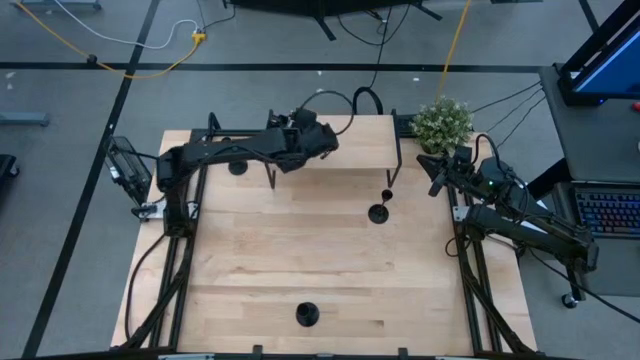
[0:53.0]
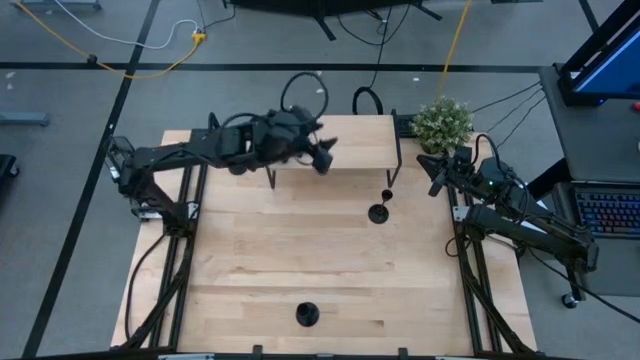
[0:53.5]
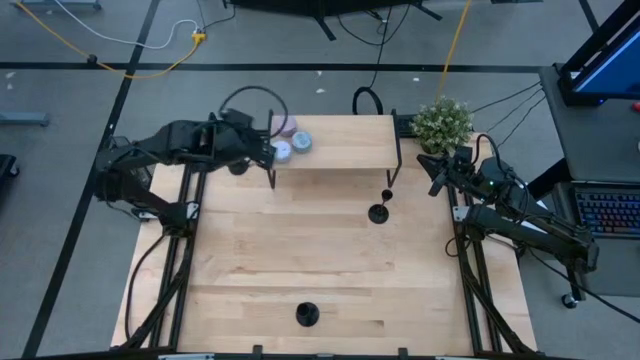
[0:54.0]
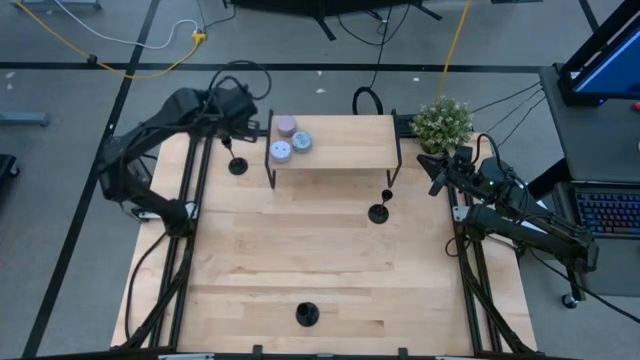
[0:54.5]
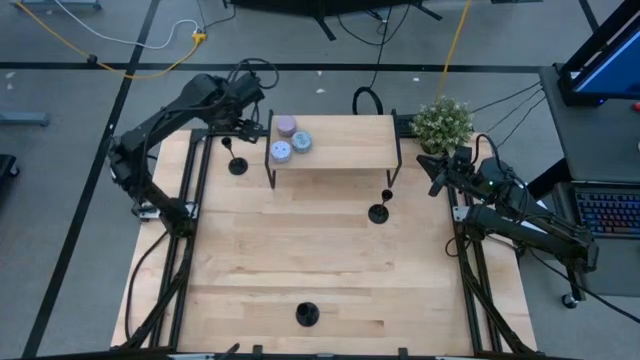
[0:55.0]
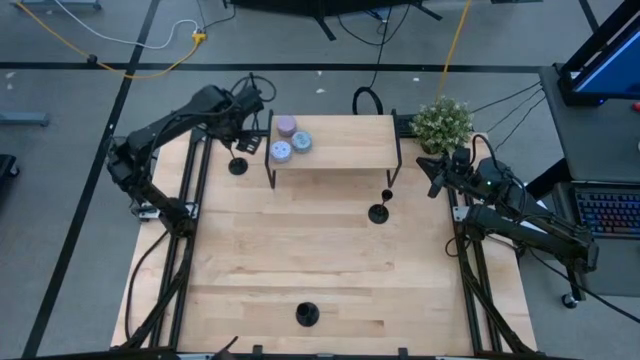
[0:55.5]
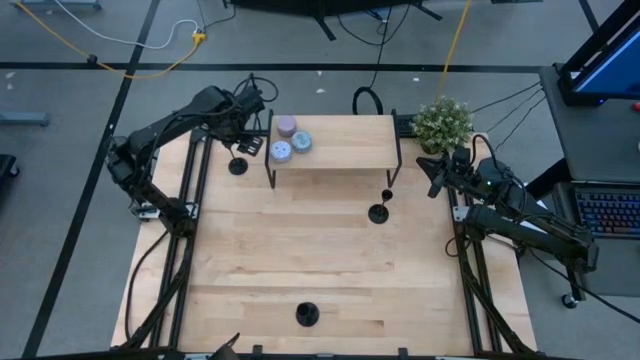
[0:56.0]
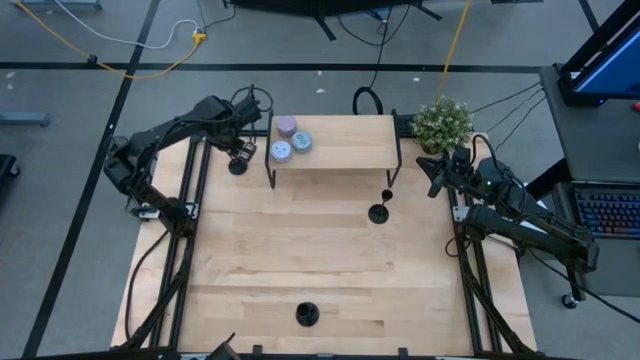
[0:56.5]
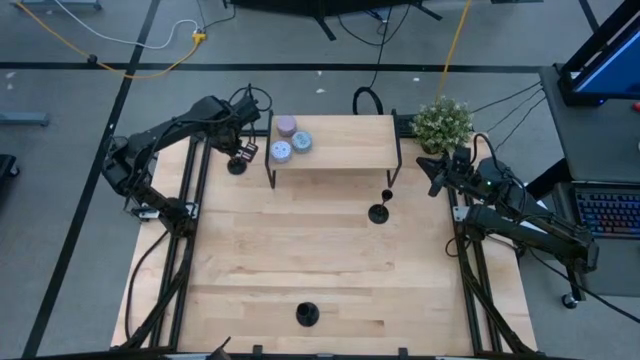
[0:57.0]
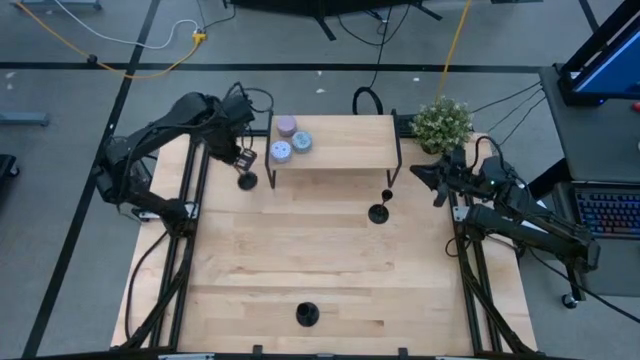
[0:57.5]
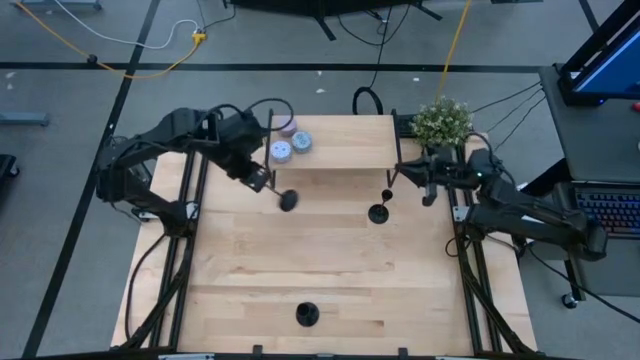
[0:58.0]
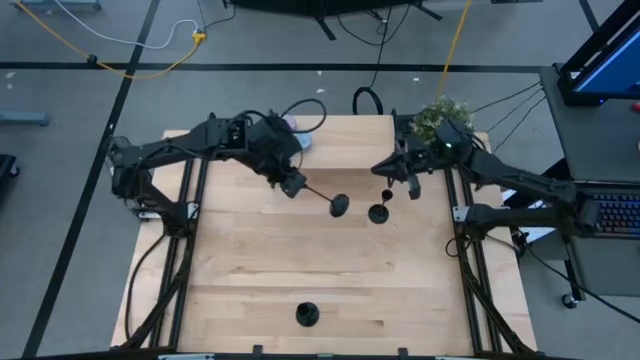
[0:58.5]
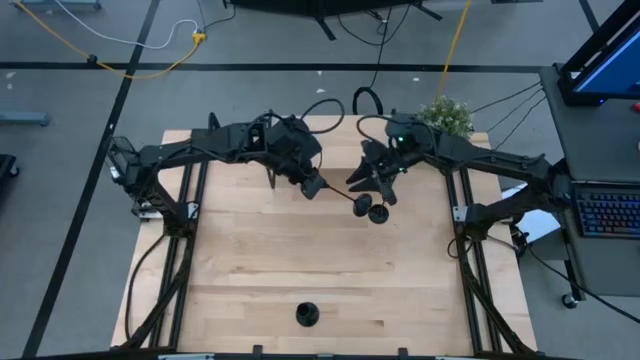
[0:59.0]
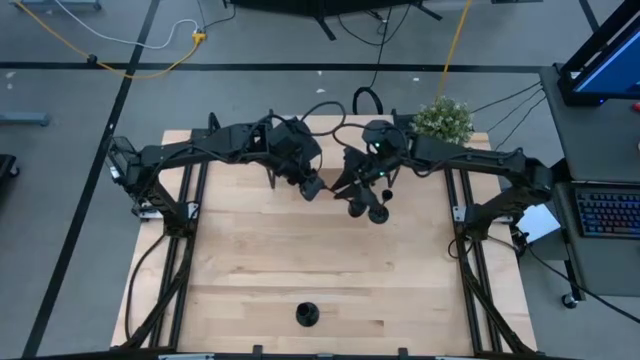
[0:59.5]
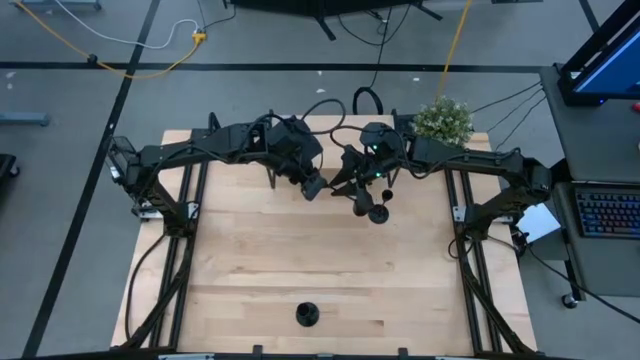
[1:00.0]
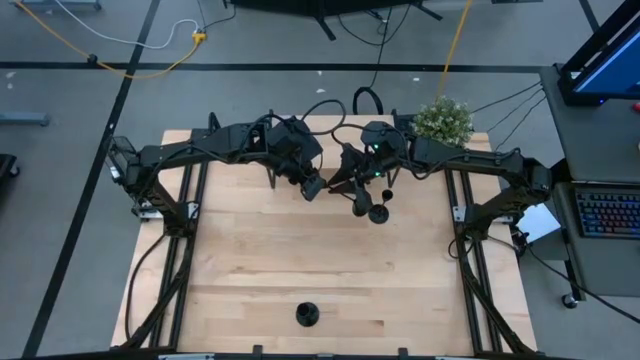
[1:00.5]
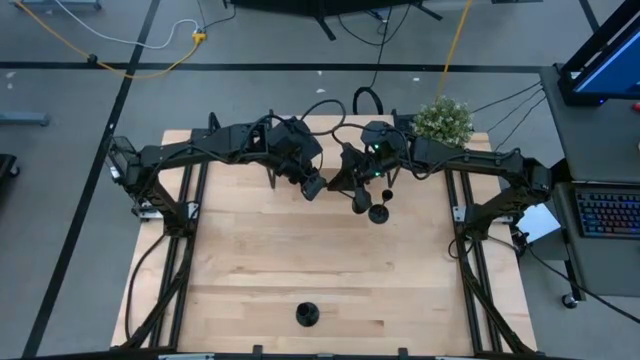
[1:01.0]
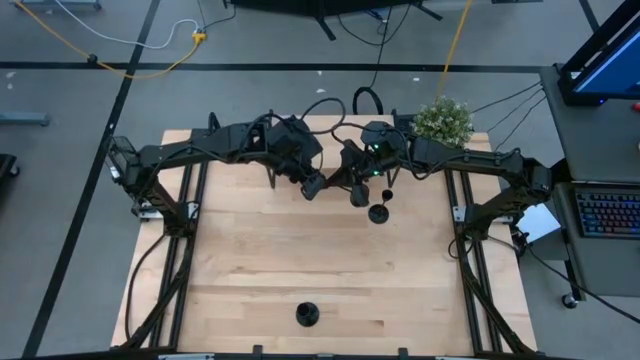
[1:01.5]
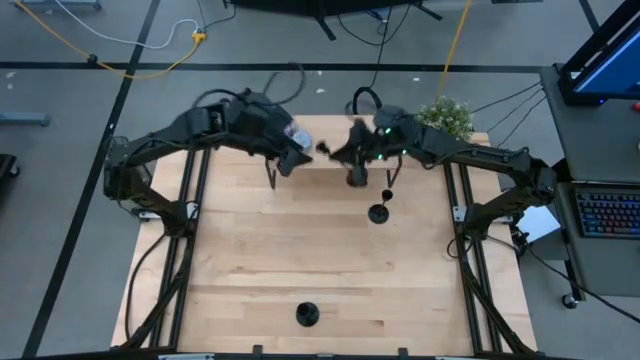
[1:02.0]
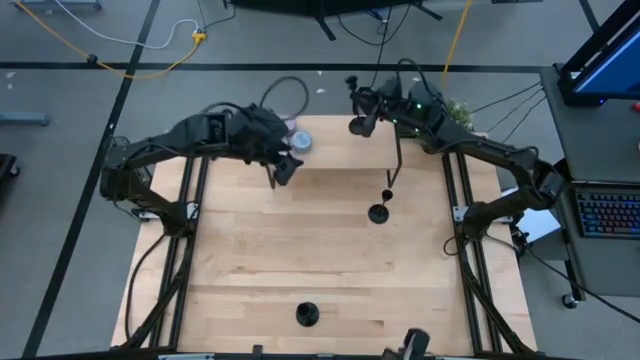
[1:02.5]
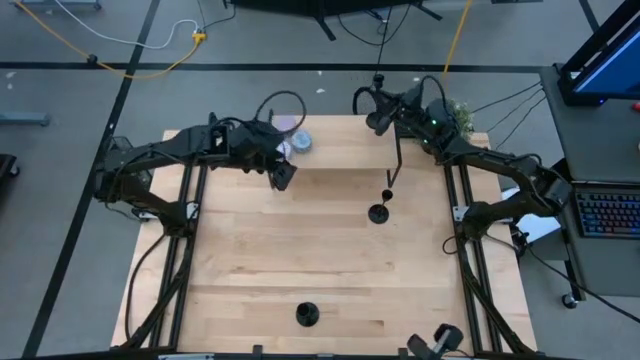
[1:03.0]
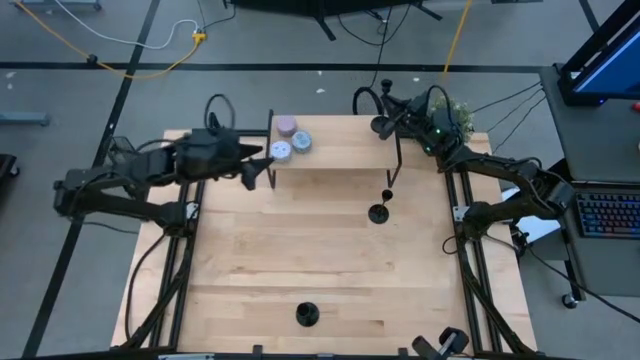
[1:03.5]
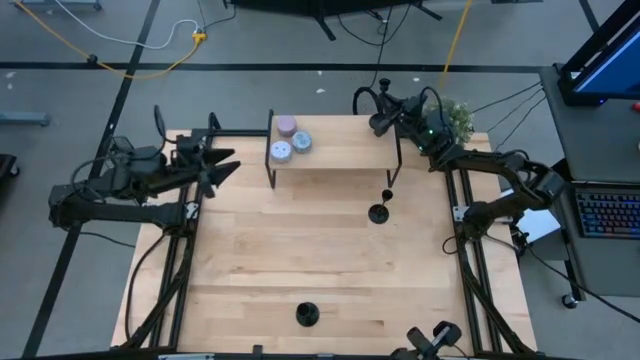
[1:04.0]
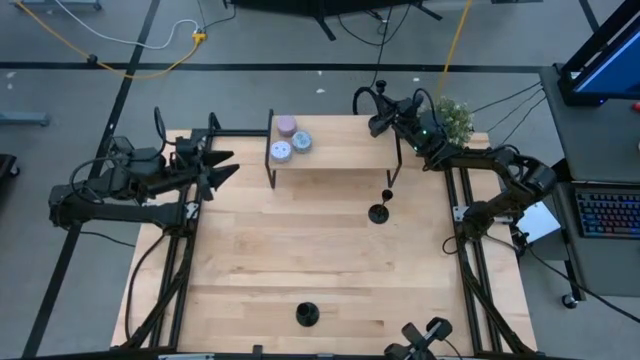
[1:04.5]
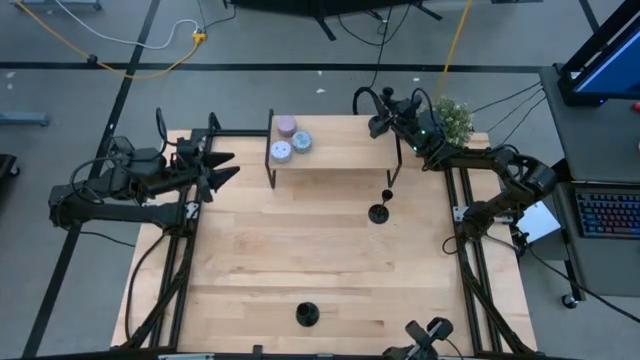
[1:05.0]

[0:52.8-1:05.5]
Task: Pick & Place candle stick holders
Put the left candle holder on the shelf

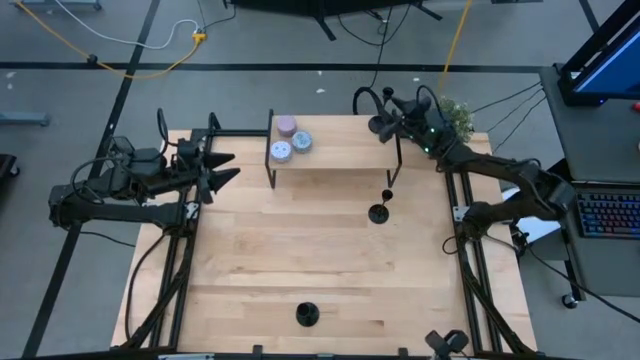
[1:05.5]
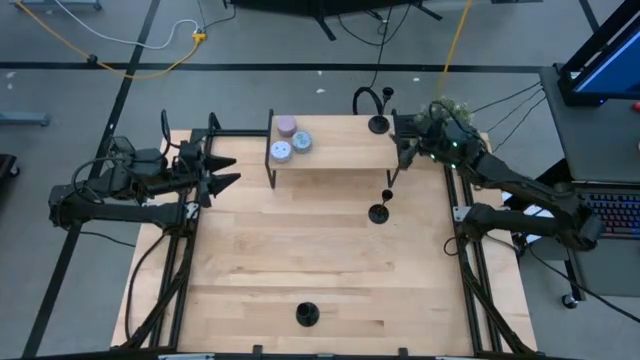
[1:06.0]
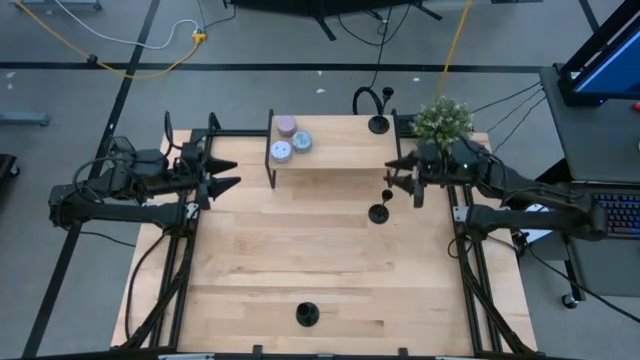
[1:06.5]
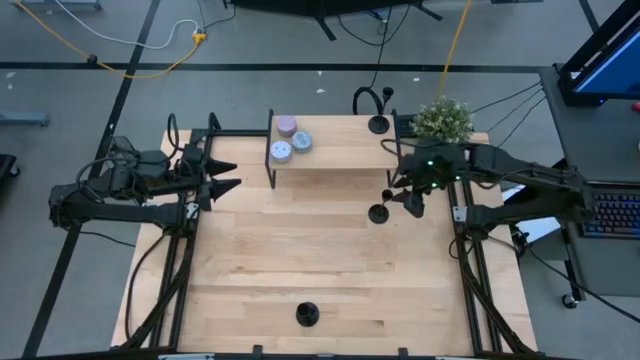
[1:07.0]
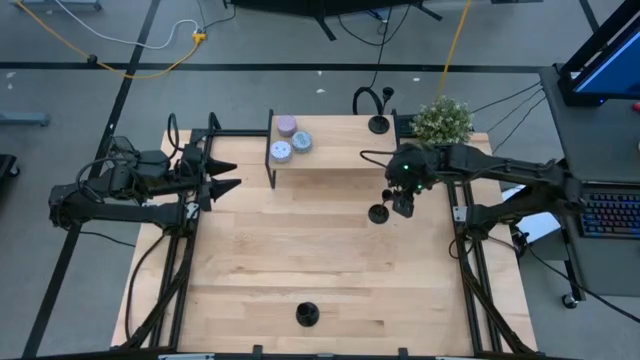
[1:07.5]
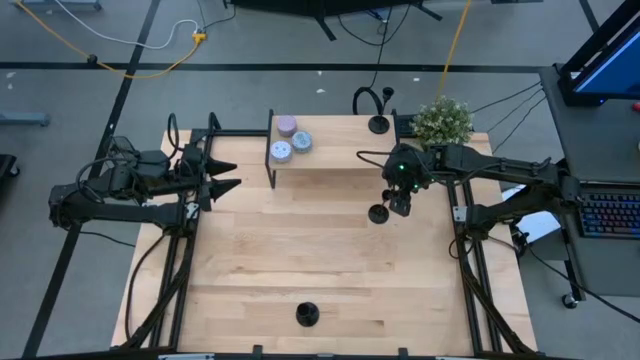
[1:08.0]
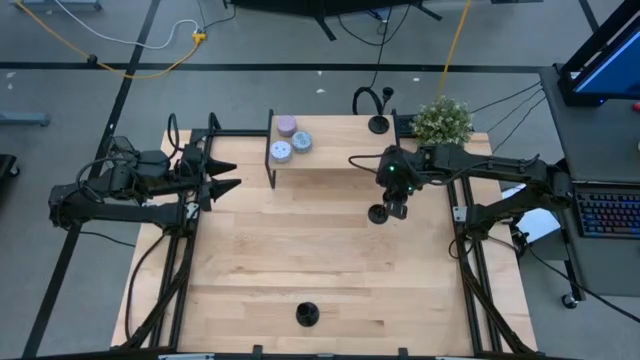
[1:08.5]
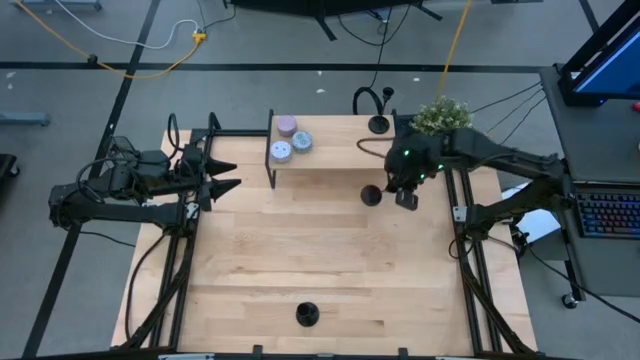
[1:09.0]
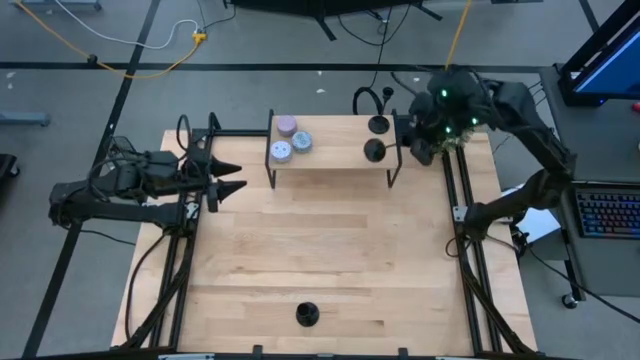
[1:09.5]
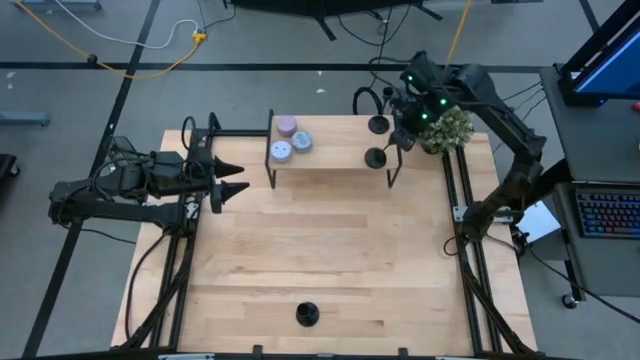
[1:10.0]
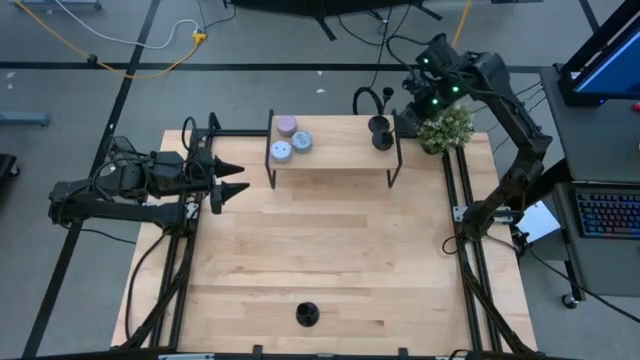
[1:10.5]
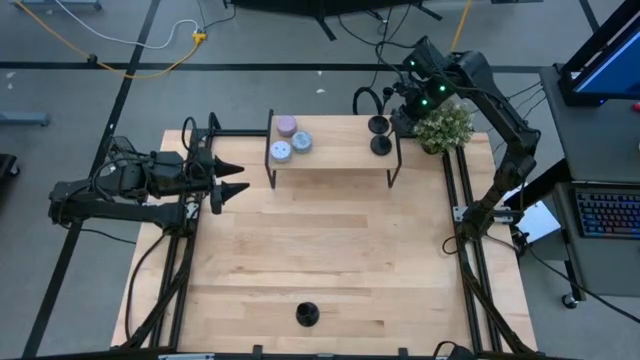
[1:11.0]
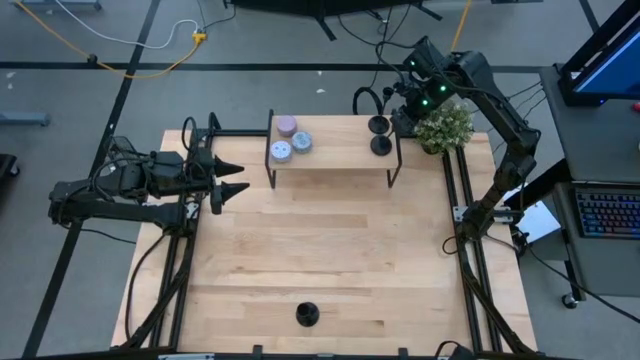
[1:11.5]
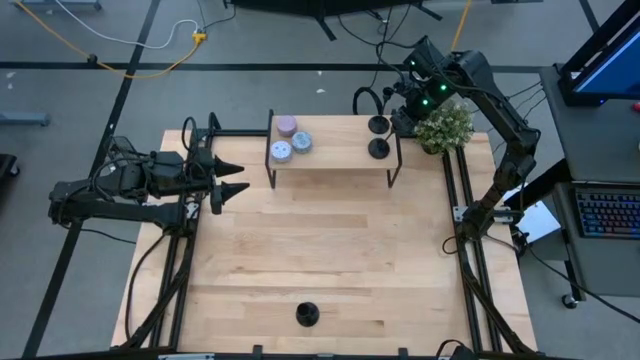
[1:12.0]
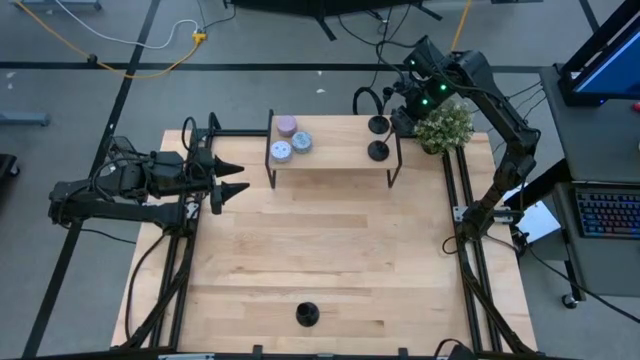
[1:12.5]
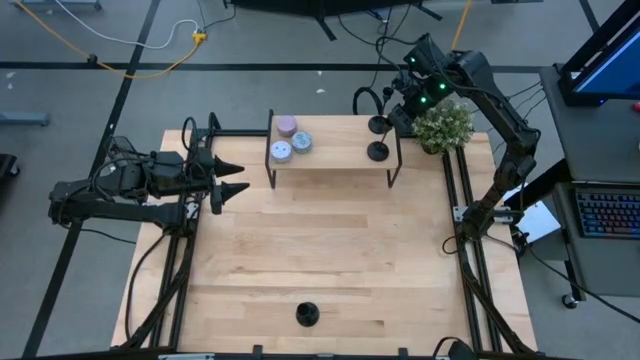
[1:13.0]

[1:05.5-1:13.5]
Put the top candle holder on the shelf

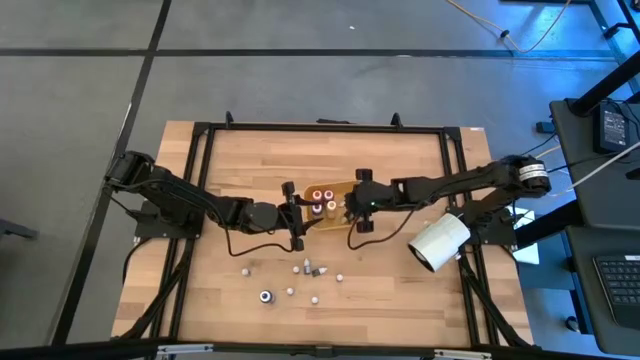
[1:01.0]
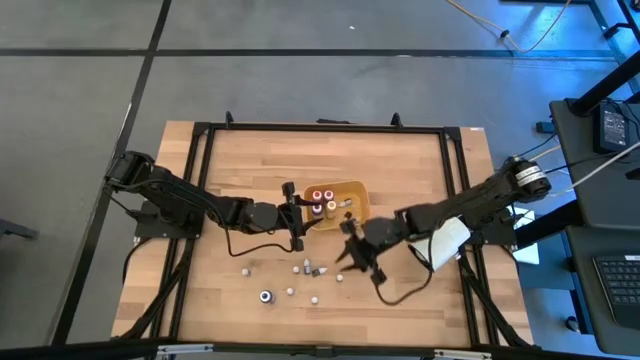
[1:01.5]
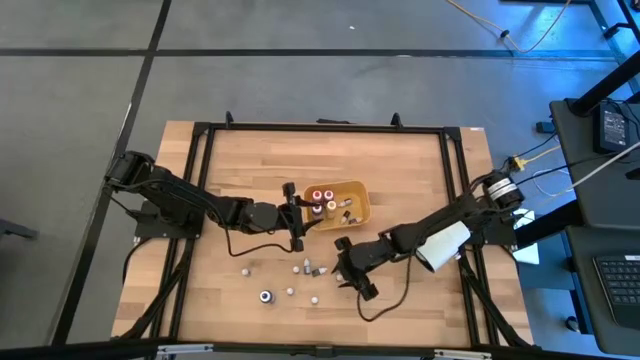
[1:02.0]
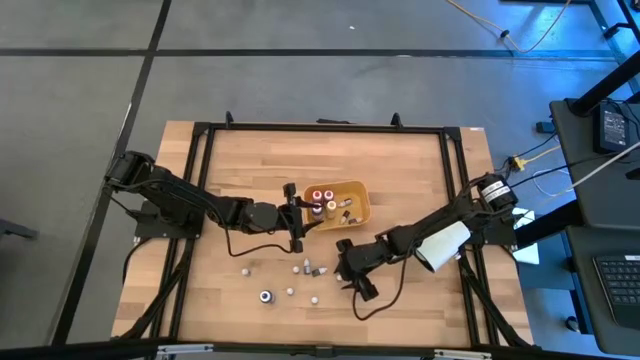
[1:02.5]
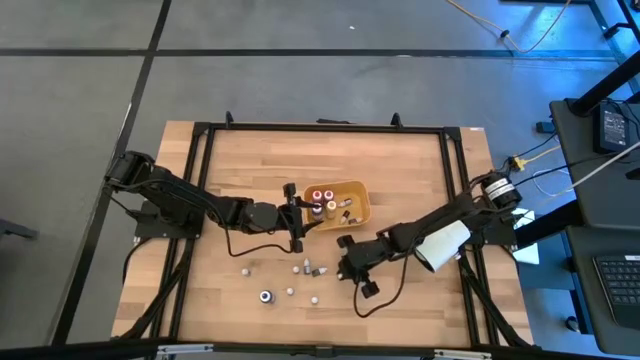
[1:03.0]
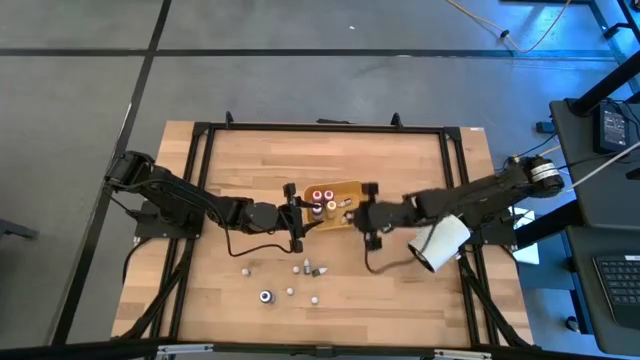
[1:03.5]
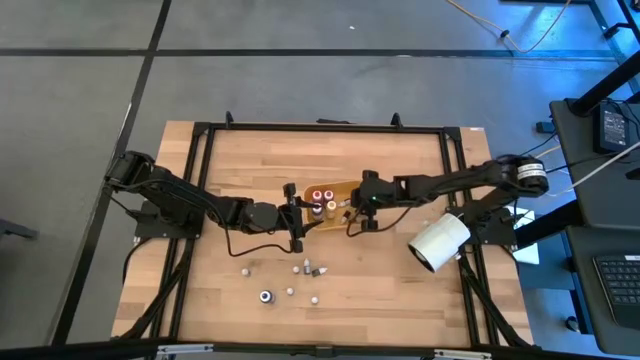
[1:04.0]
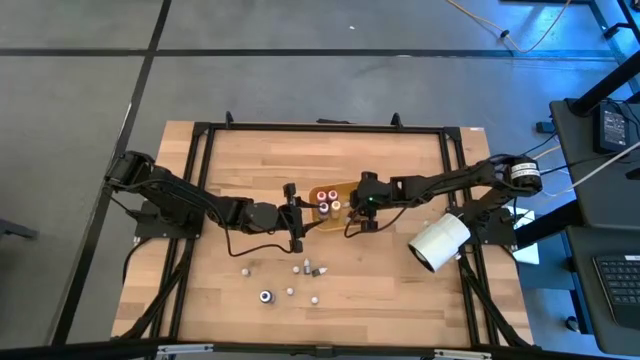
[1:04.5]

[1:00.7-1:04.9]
Task: Pick & Place food coloring
Put the small pink food coloring bottle into the yellow bin
